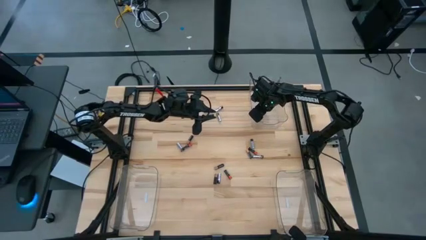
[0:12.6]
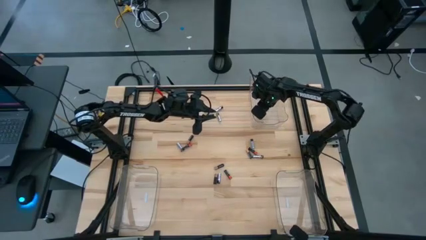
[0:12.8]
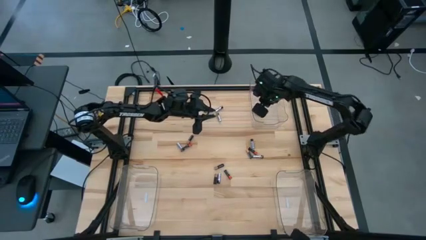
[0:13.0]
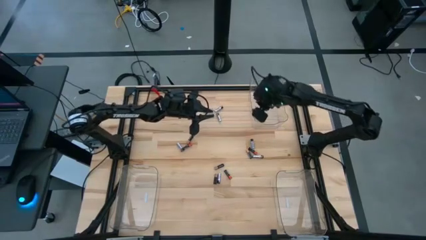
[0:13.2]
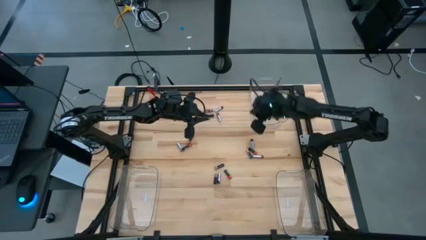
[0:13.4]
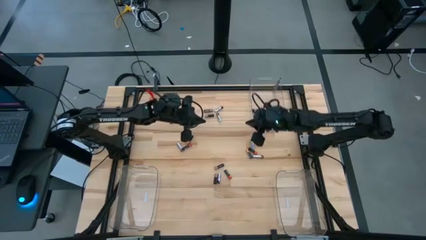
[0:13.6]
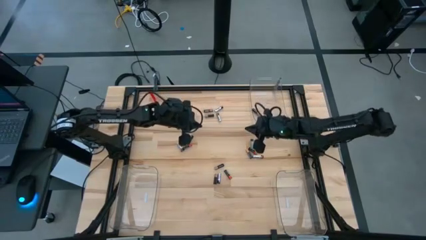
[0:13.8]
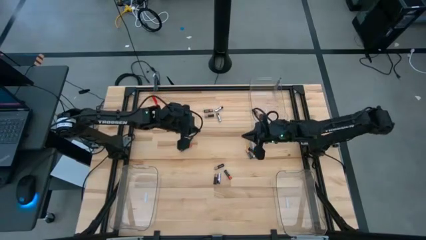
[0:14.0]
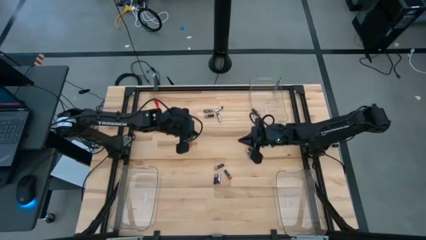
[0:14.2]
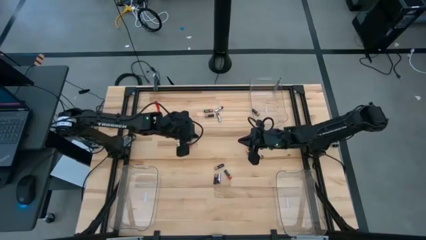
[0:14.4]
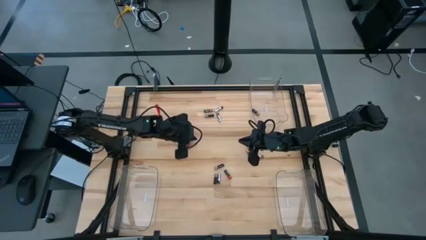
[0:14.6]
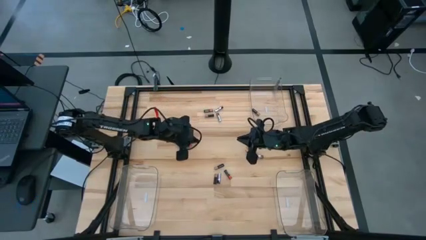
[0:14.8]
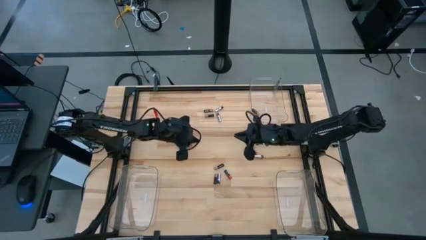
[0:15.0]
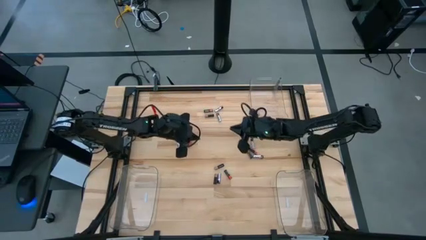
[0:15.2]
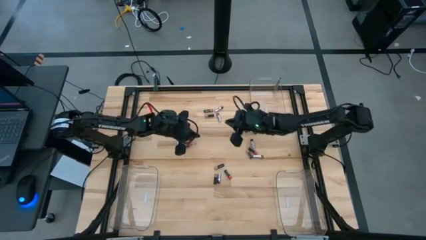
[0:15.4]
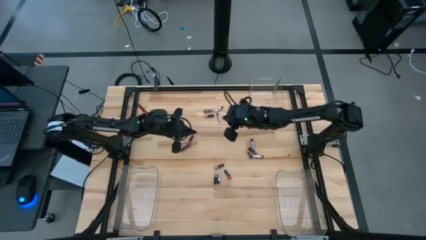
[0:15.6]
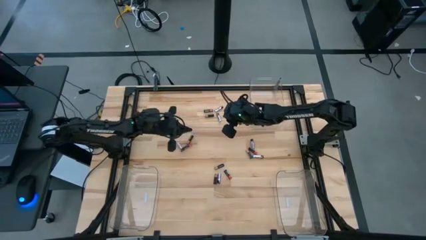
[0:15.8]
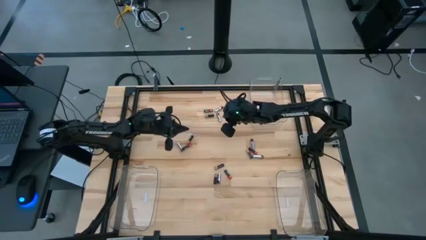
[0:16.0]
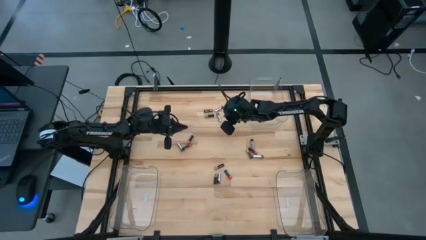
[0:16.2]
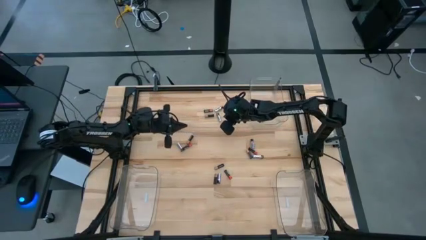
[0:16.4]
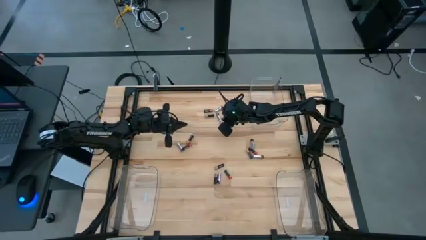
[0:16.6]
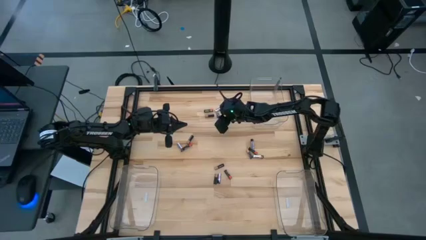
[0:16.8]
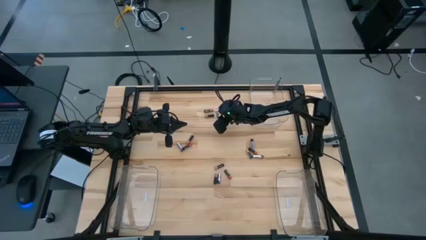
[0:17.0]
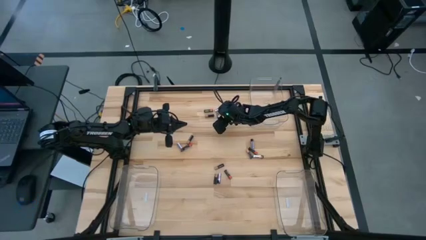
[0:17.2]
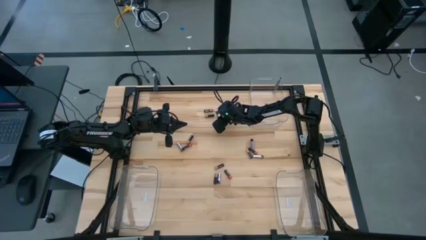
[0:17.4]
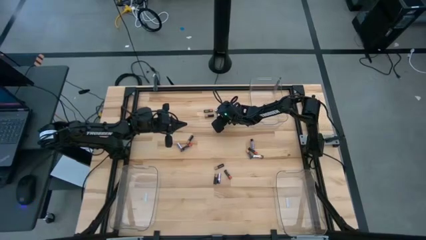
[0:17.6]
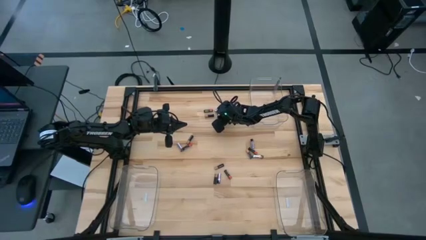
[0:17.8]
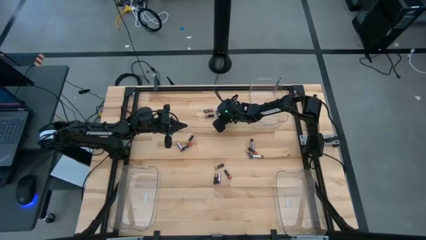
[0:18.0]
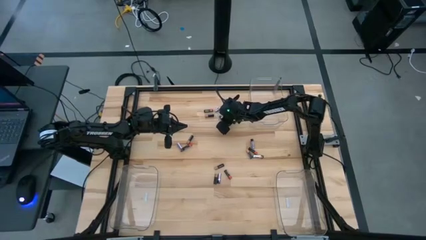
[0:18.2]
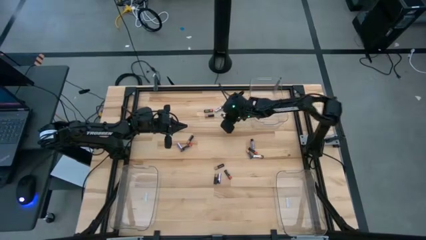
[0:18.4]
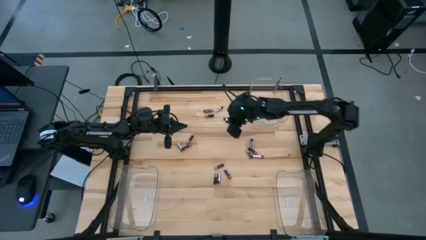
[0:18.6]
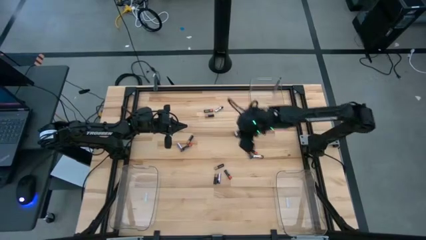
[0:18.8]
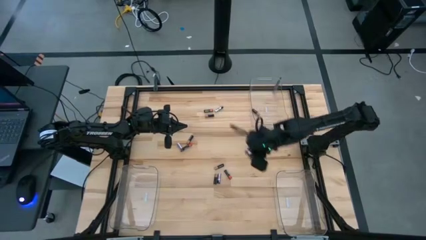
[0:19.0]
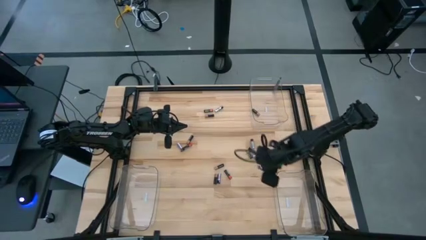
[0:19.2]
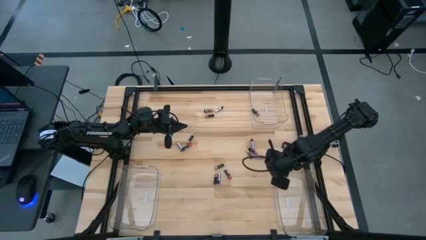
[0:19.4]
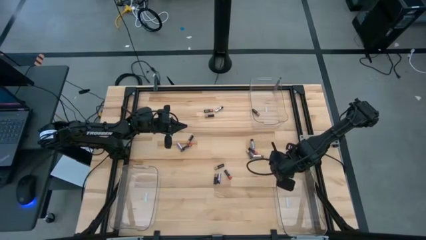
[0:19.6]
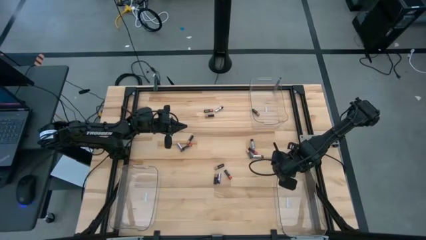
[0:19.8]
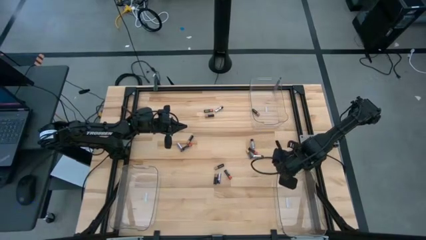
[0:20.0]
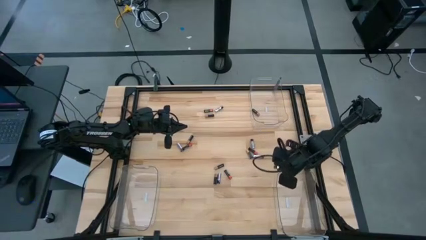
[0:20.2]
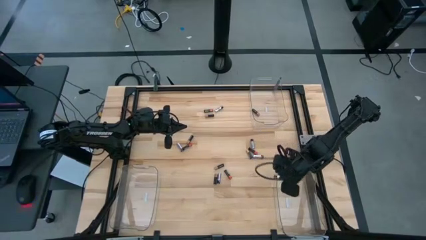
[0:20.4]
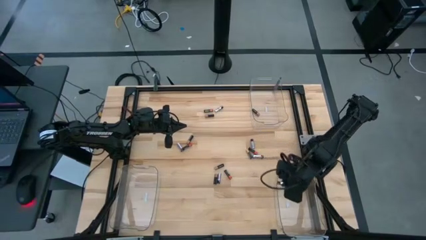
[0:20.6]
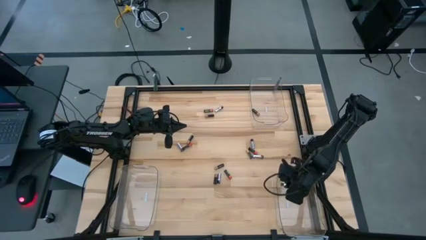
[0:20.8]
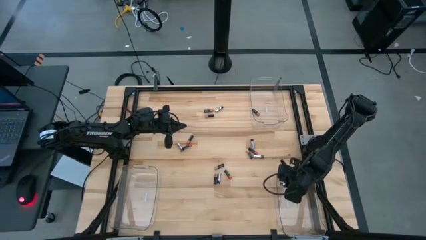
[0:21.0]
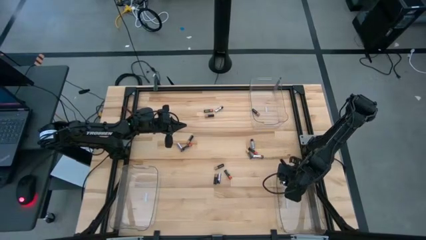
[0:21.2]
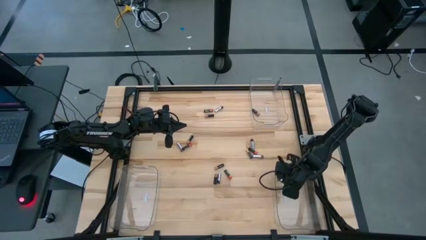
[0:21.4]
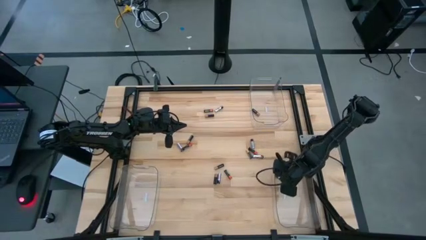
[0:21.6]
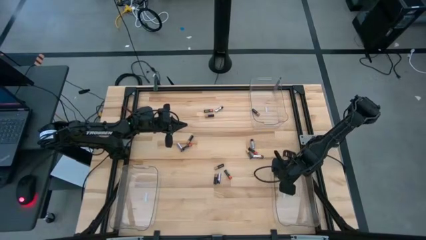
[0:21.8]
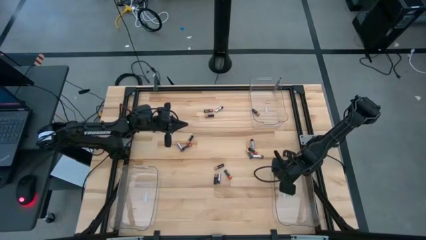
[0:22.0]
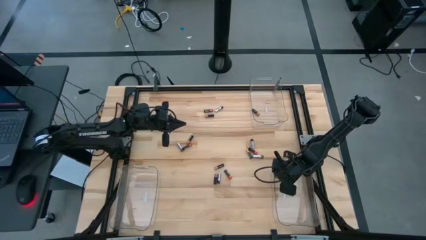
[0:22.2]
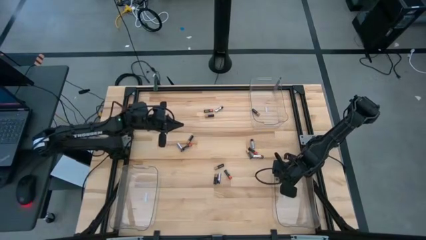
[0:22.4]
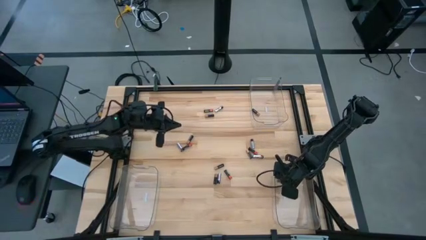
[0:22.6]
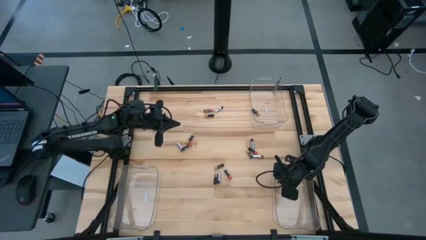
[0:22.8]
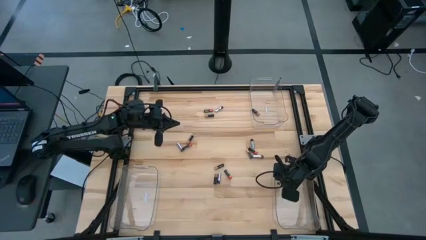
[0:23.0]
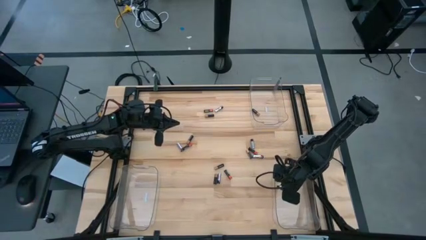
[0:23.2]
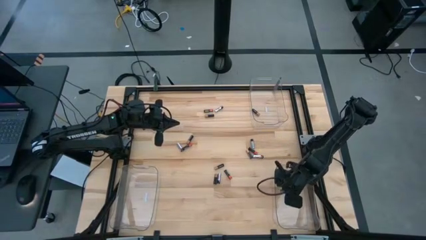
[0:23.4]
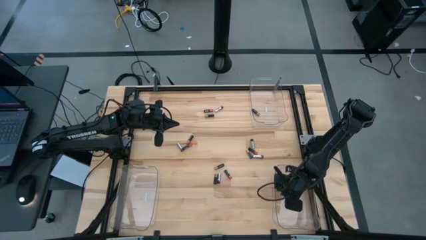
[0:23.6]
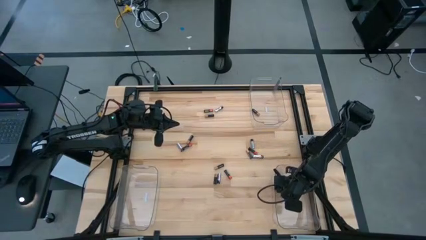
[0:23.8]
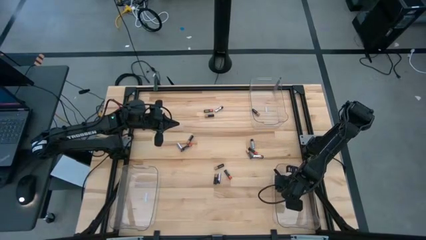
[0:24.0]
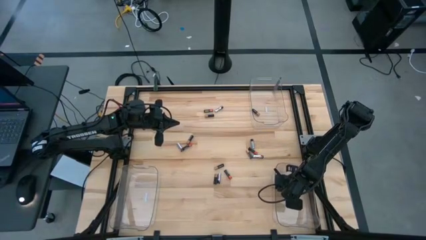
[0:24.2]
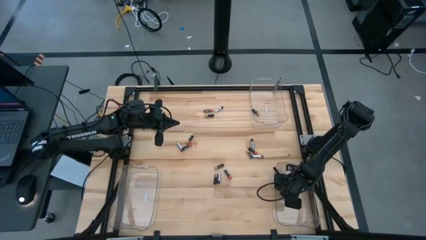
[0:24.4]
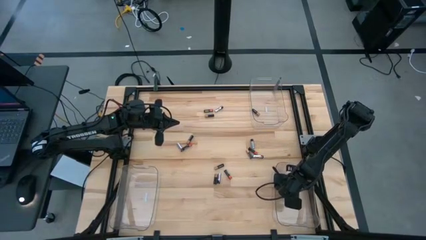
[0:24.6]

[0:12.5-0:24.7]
Task: Sort batteries
Put the white battery into the bottom right transparent bin

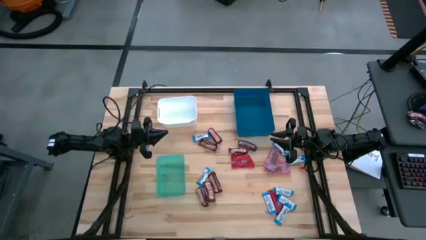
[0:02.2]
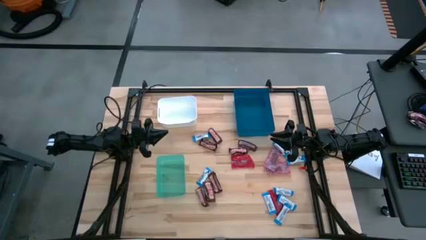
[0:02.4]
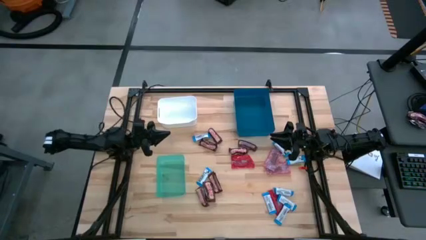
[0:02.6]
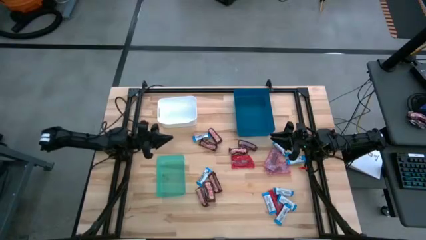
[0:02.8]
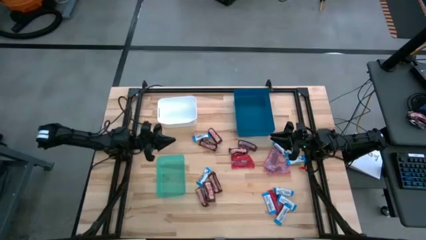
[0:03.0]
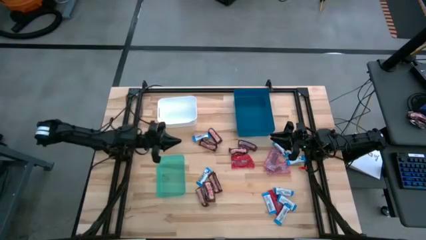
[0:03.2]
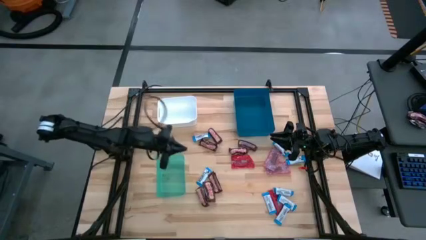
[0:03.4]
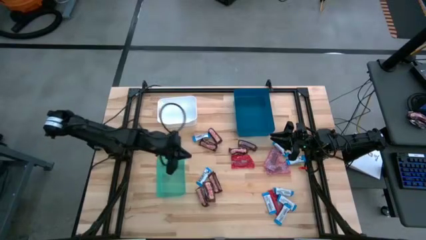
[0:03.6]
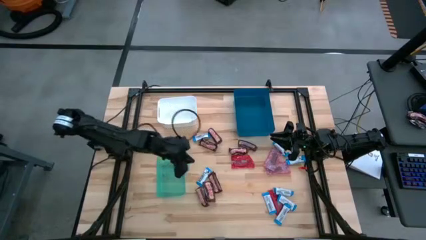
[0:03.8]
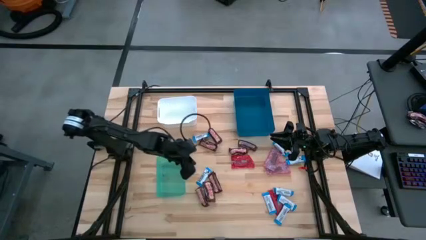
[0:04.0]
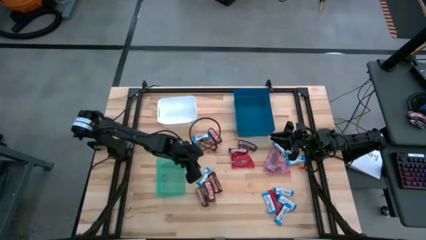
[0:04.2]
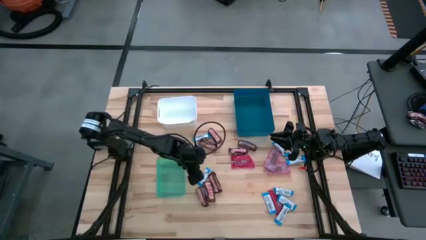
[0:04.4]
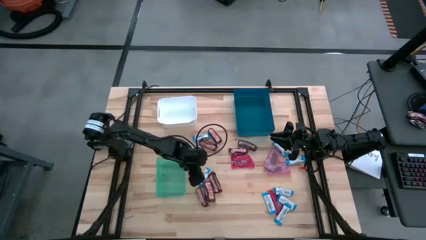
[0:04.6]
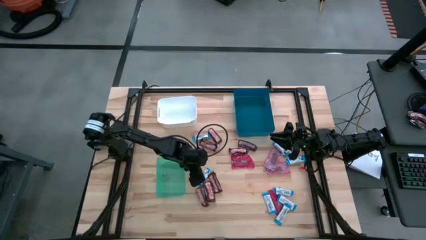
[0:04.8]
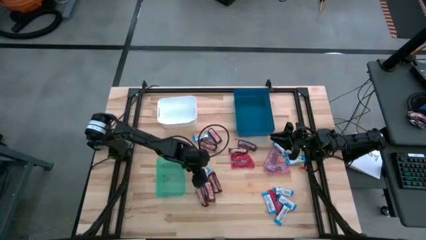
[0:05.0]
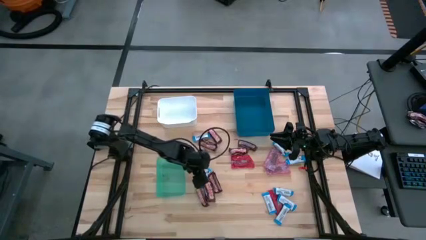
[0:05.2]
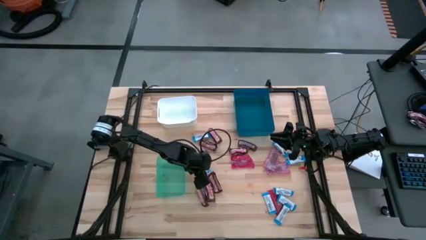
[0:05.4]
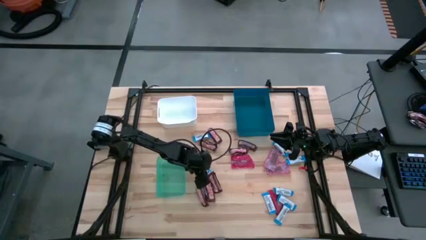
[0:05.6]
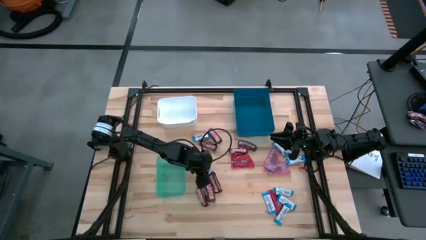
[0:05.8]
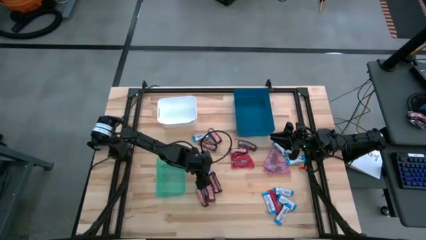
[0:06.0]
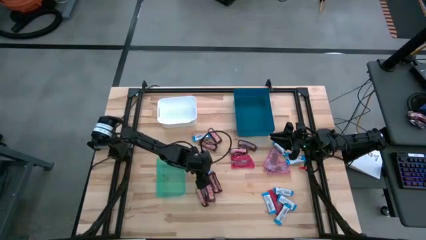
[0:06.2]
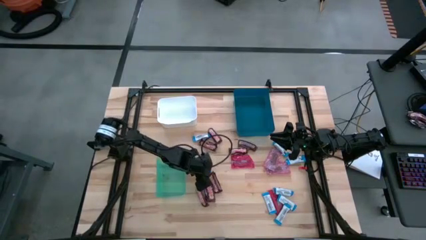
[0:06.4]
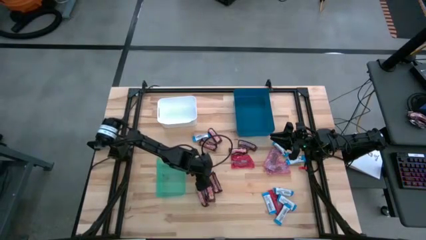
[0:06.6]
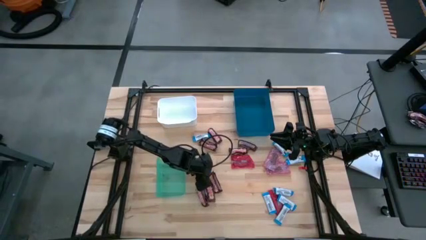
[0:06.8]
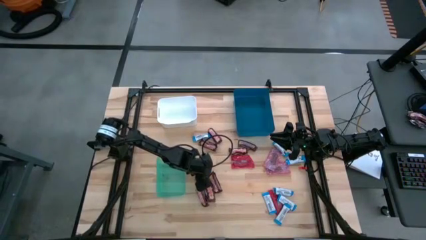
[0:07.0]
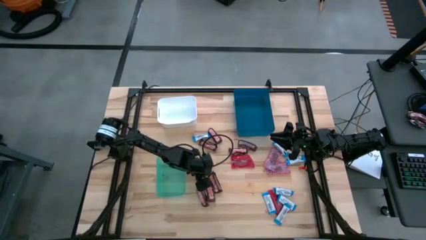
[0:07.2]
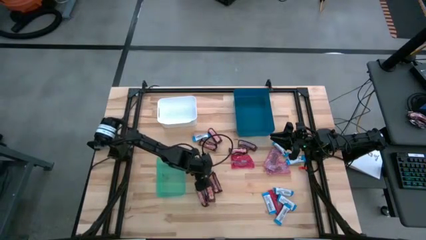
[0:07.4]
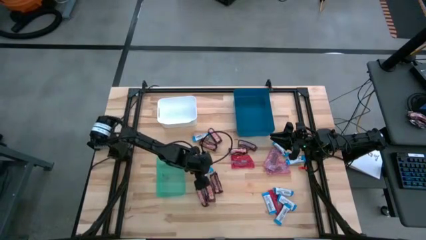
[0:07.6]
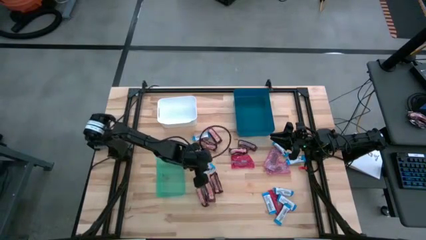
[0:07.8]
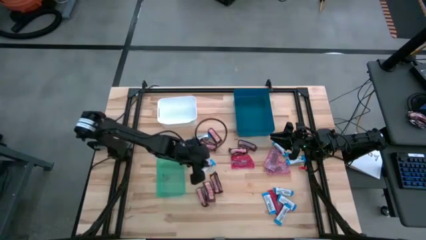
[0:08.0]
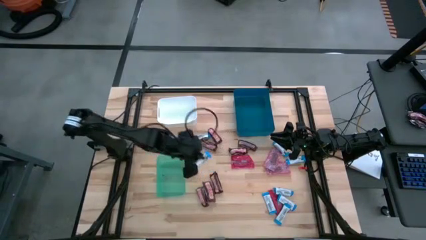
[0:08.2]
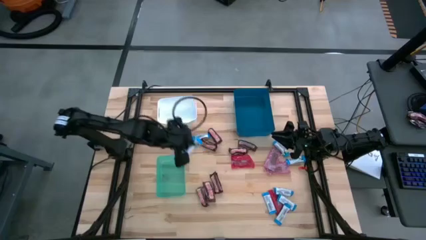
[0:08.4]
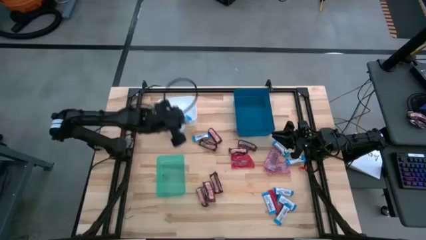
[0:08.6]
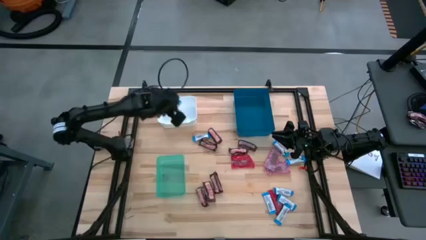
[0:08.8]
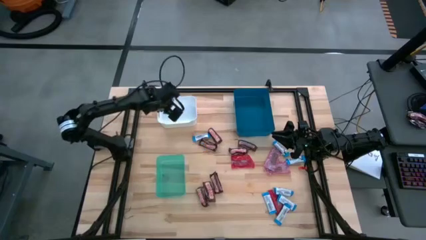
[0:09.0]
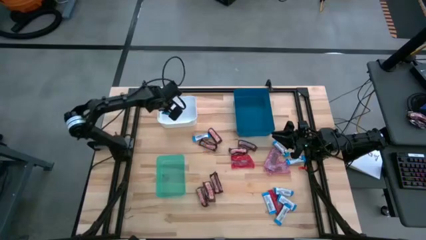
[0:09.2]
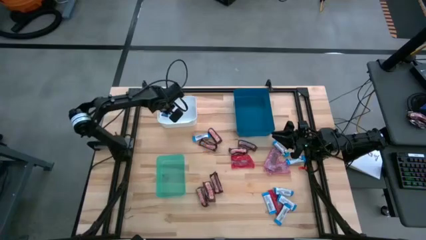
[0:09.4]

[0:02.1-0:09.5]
Task: Sort candy
Put the white chocolate bar into the white bin
